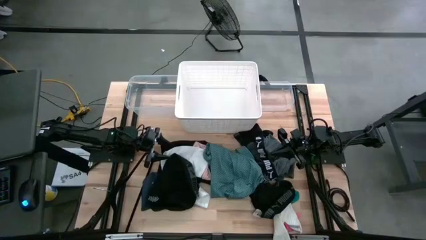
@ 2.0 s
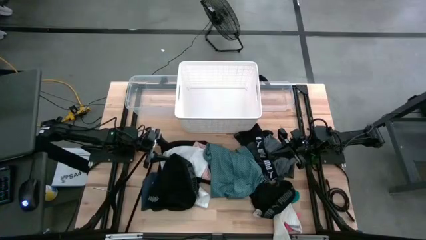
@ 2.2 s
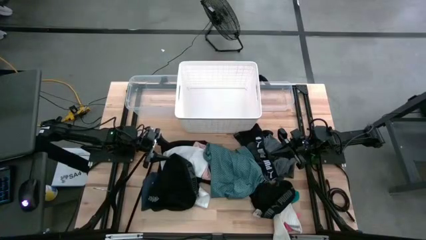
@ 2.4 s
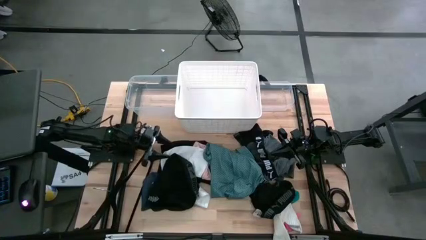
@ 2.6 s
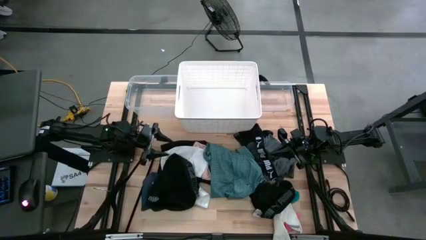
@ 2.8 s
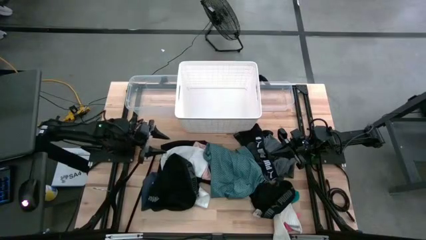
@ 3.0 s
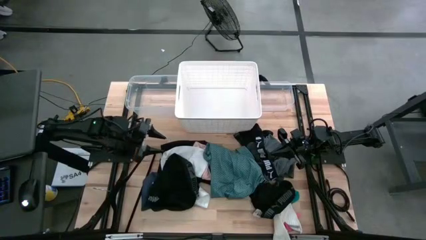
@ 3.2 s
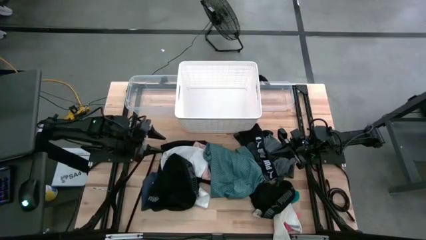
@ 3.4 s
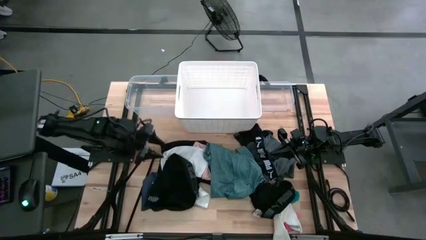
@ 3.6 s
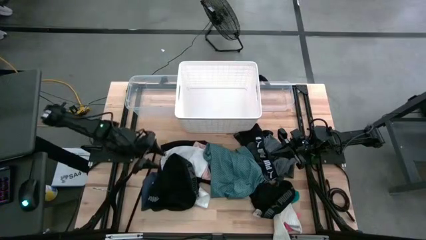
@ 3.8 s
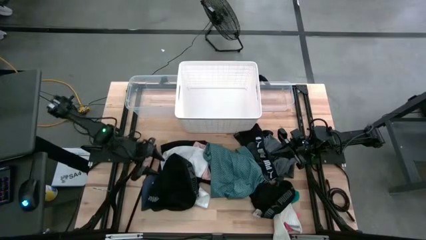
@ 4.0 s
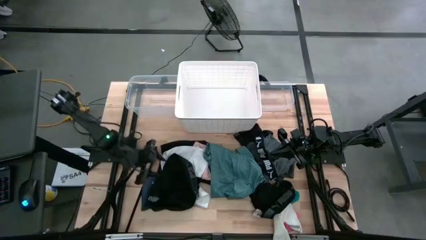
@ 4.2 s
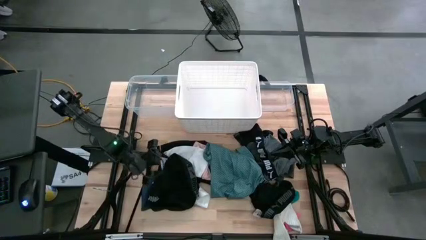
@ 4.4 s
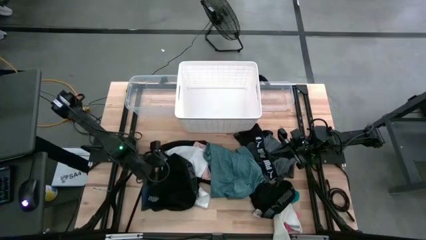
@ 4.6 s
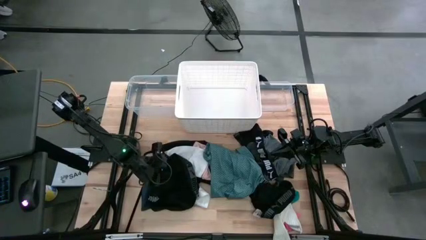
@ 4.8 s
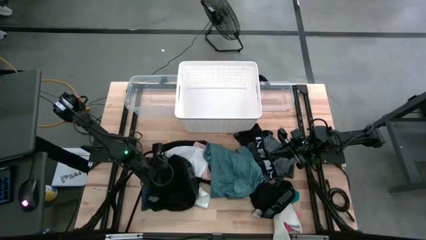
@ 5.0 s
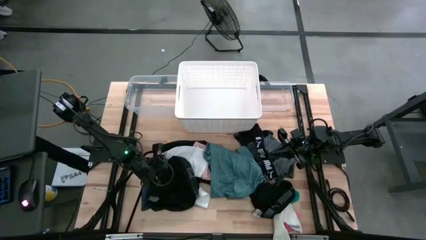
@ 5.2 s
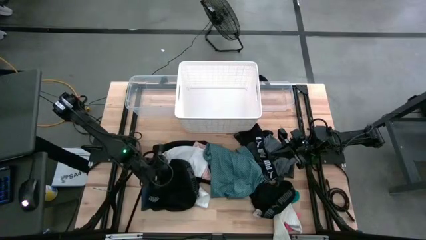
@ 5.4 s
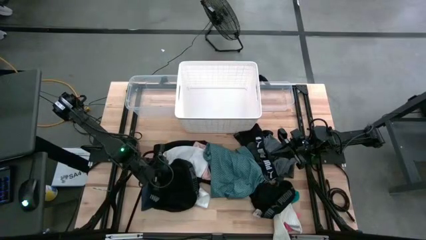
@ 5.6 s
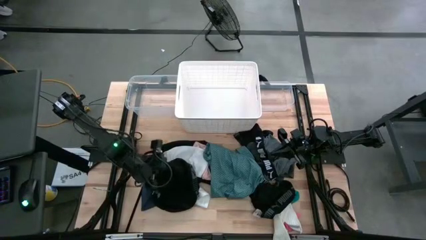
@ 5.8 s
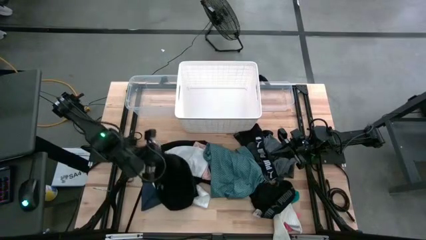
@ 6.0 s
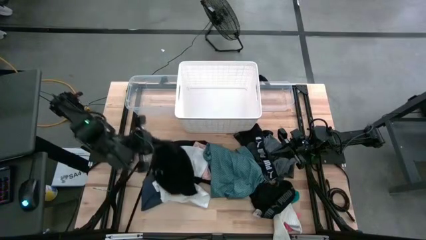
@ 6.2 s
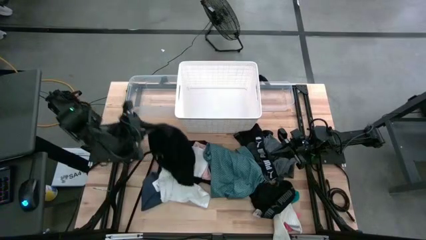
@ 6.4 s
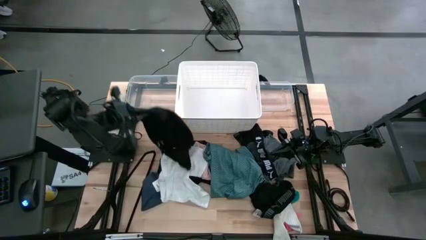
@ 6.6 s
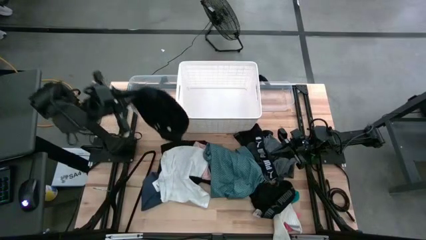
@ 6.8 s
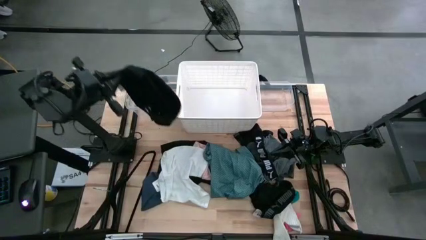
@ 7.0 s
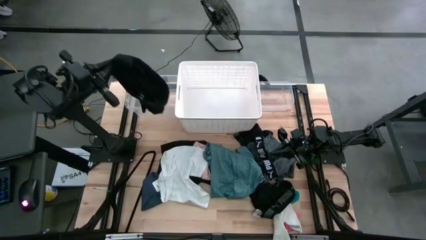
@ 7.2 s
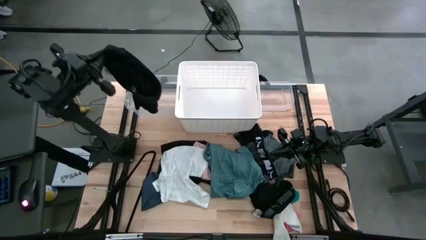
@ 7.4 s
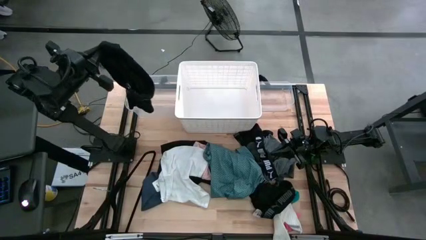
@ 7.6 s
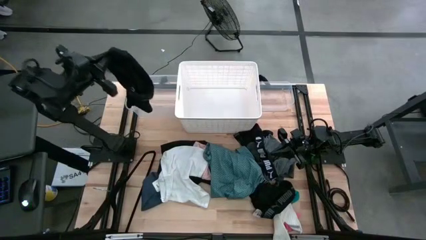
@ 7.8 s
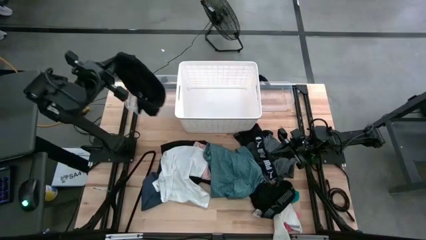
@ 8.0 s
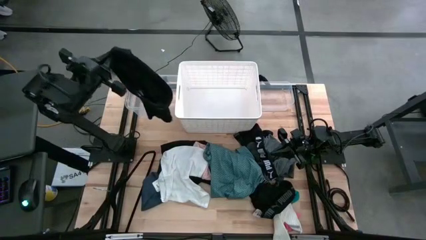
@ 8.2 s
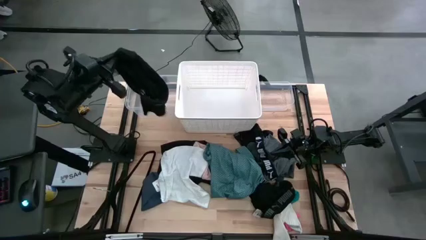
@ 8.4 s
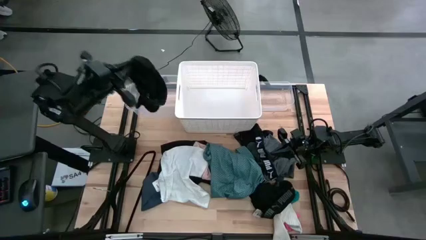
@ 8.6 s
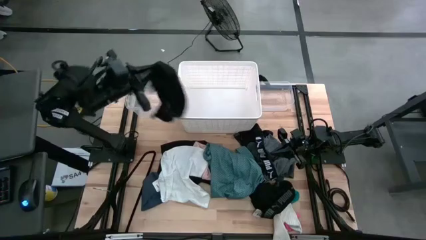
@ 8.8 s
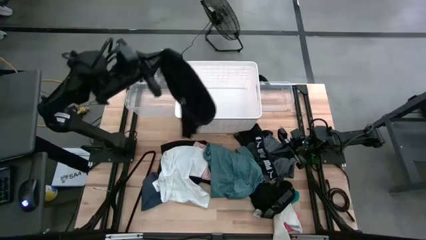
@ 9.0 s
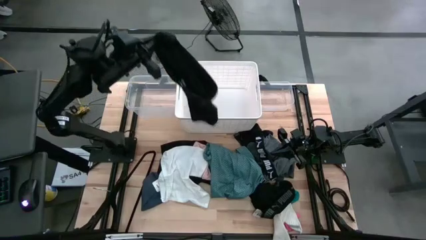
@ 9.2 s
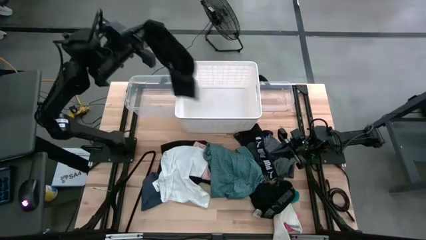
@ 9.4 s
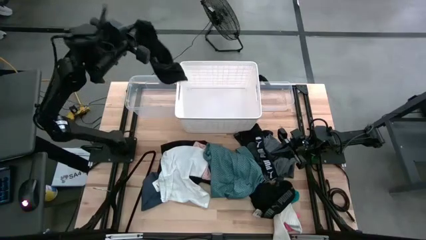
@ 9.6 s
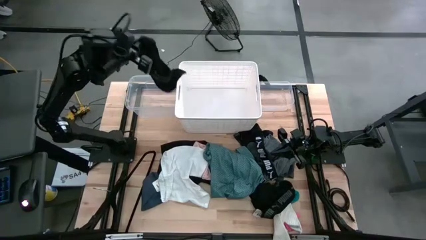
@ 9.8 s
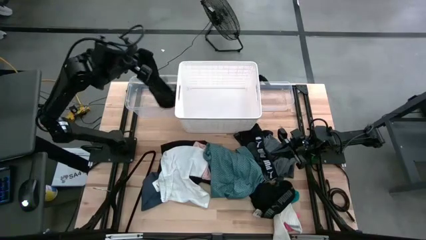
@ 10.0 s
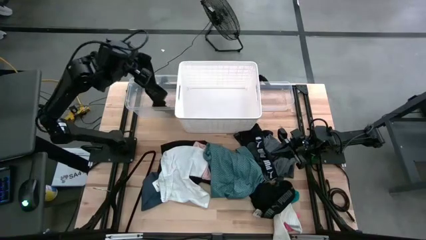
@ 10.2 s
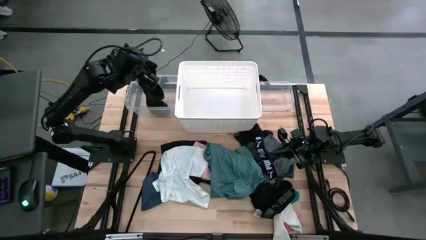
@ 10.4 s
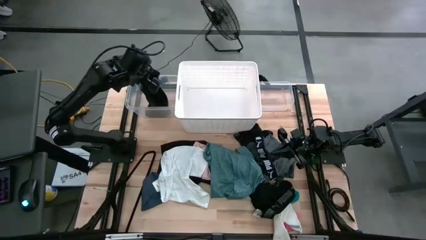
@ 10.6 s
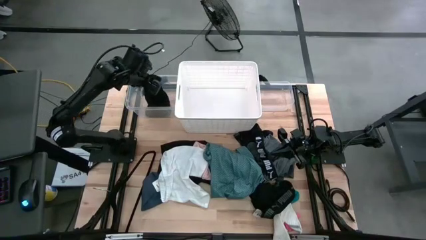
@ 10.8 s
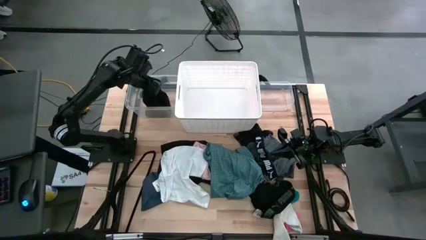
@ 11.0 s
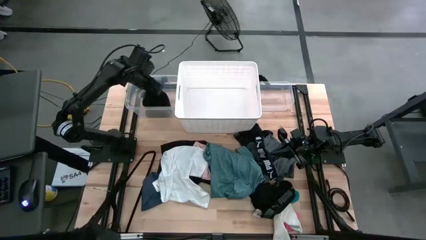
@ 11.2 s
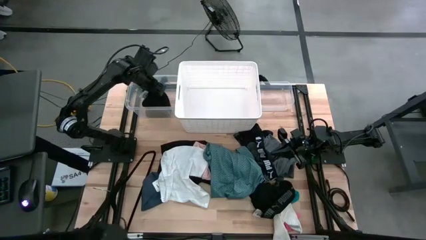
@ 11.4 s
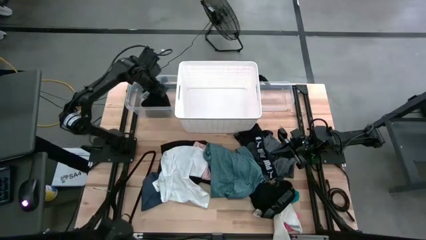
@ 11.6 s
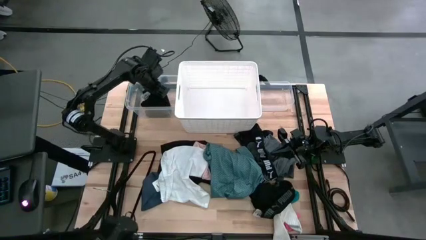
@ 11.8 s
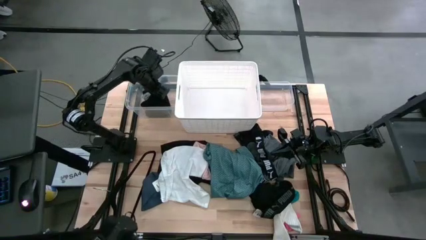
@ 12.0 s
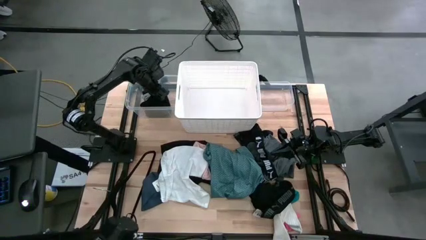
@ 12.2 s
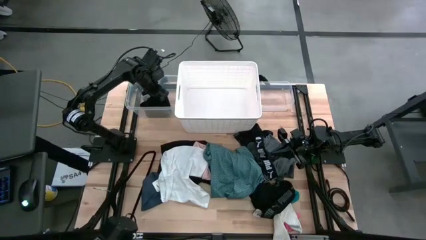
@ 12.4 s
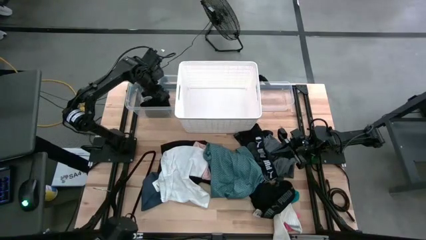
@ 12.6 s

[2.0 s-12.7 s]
Task: Pick & Place Cloths
Put the top left black boxers into the left transparent bin
